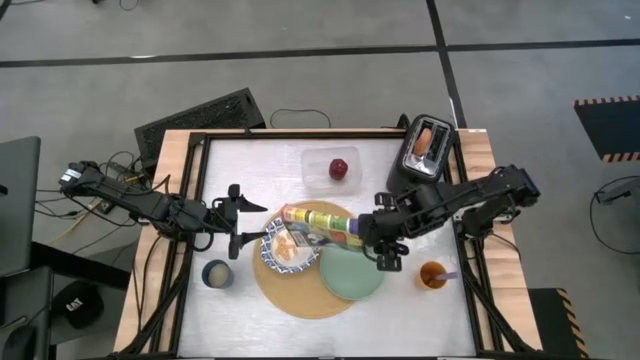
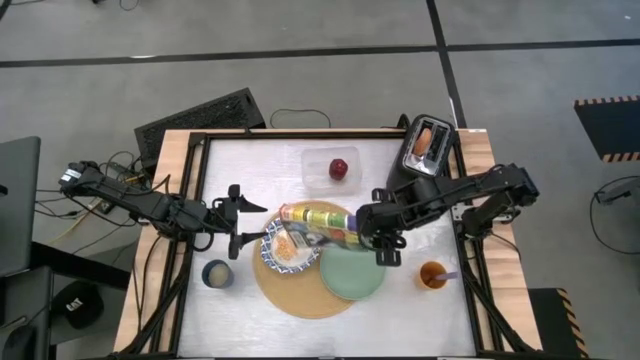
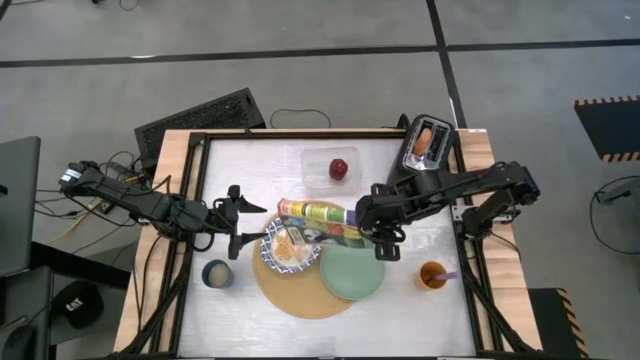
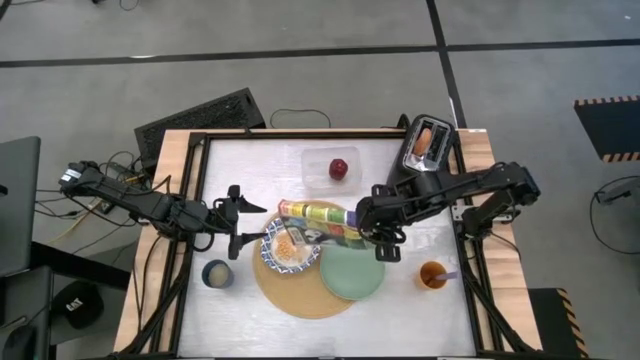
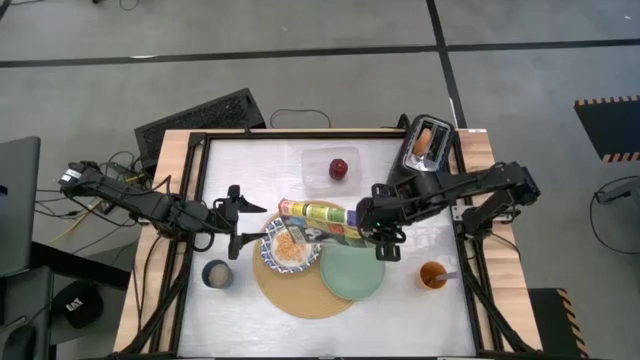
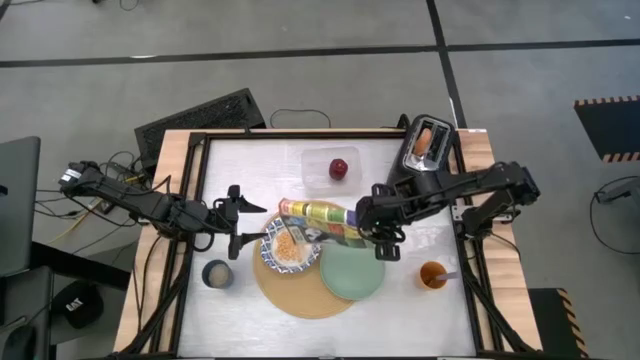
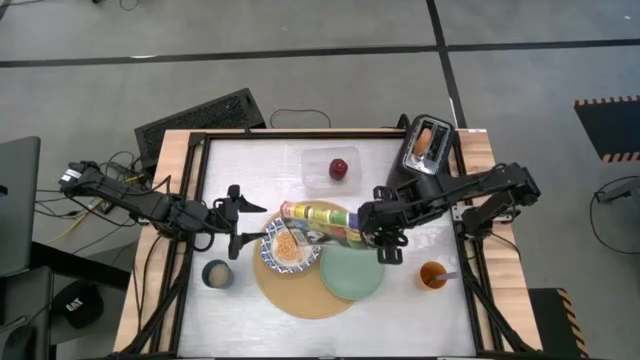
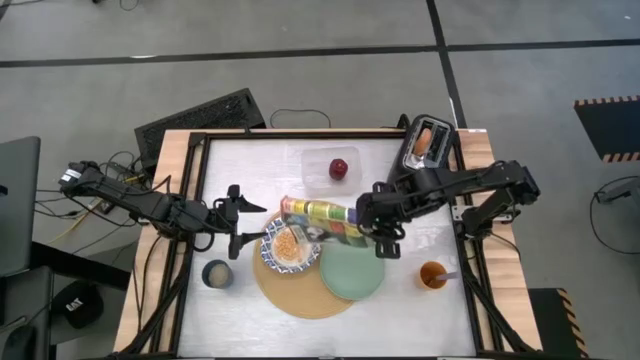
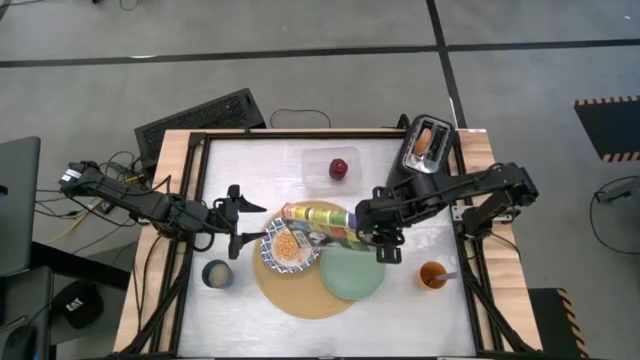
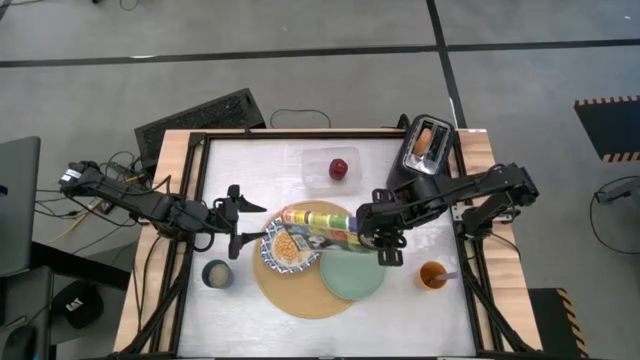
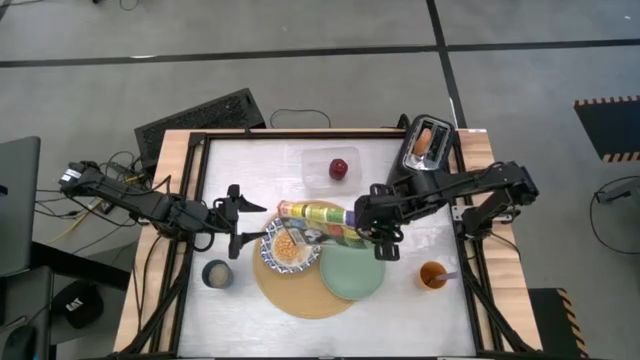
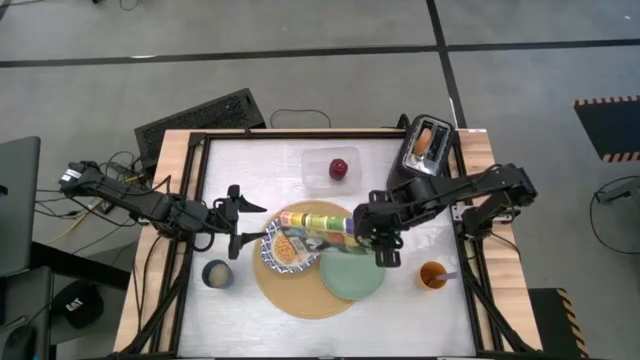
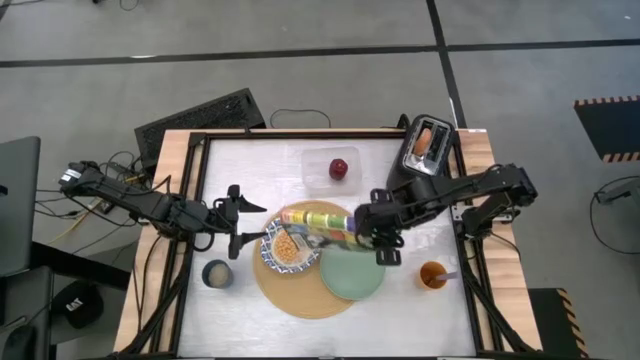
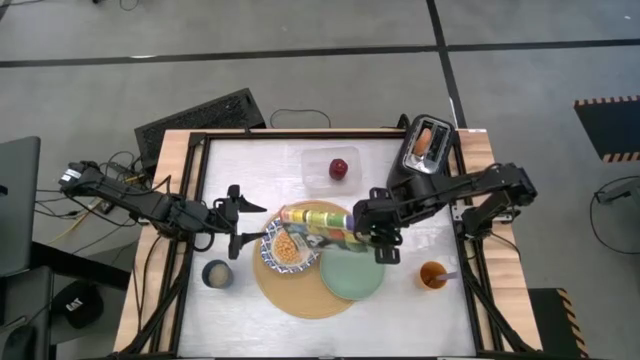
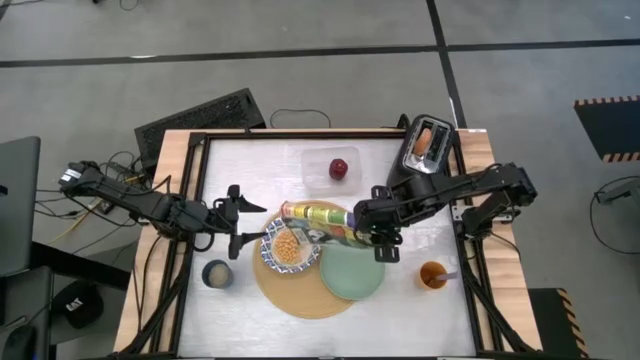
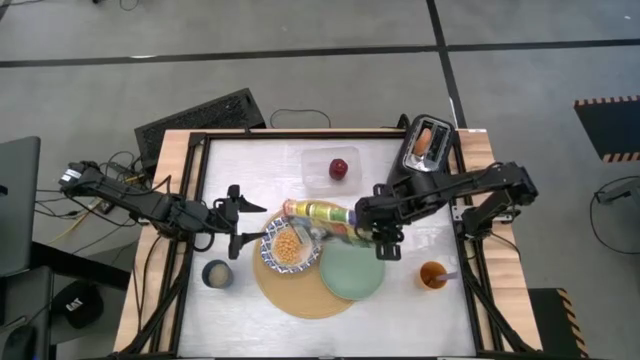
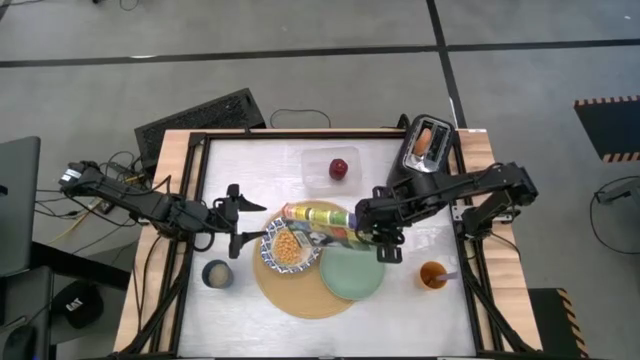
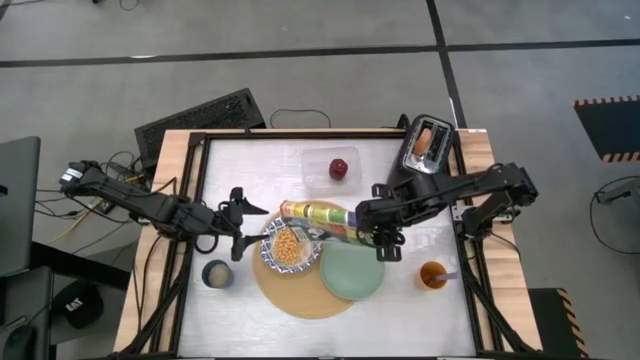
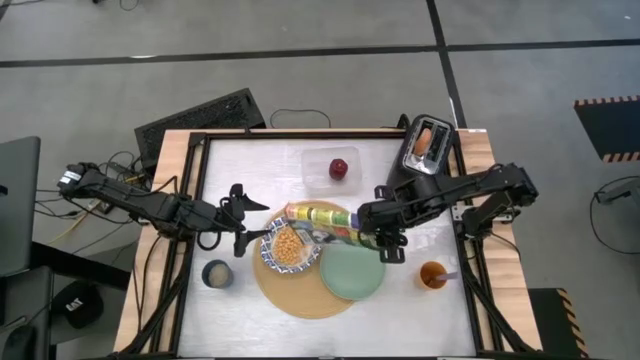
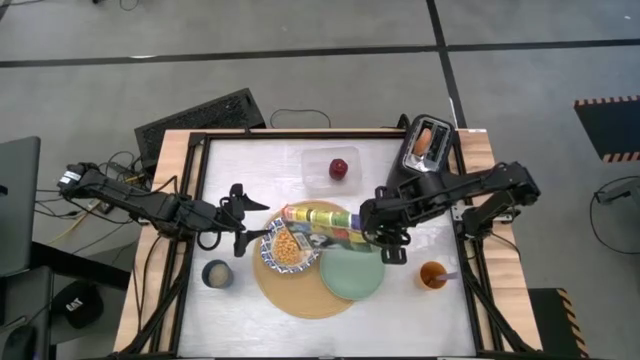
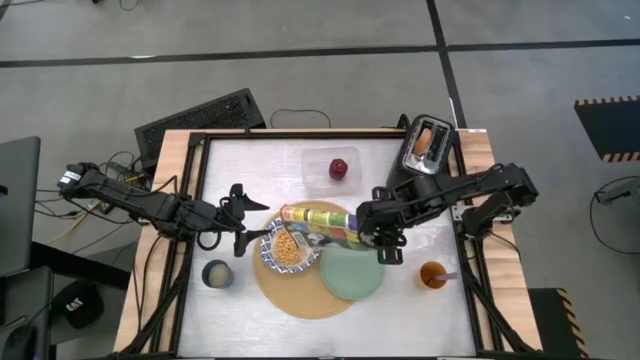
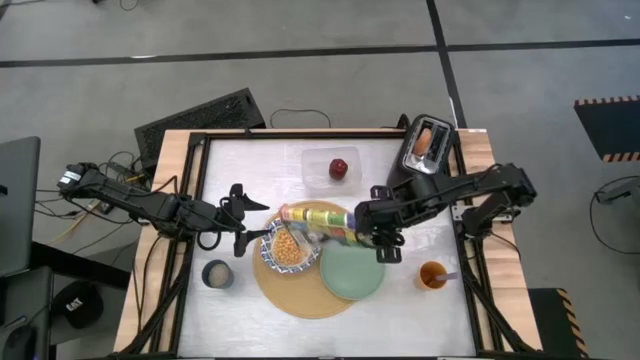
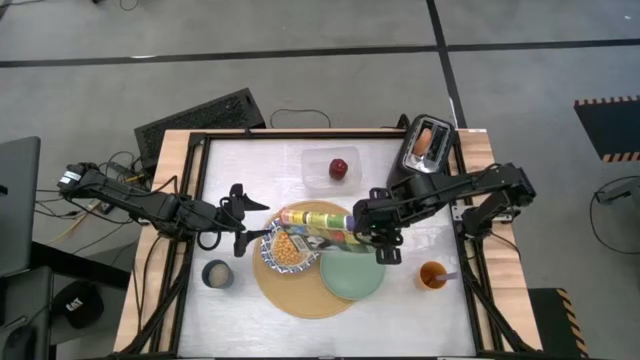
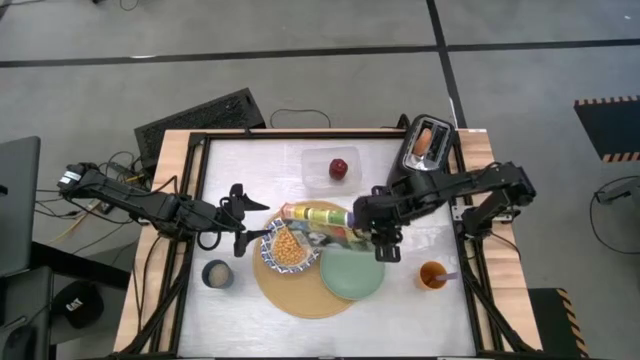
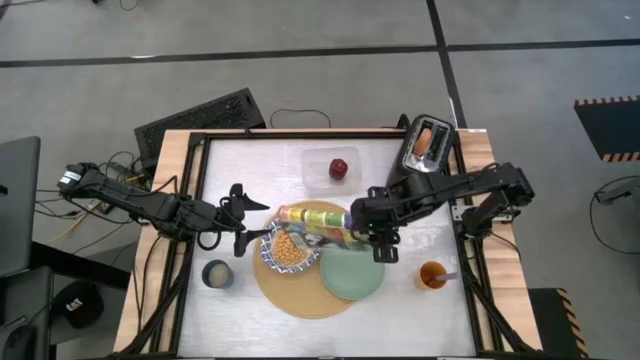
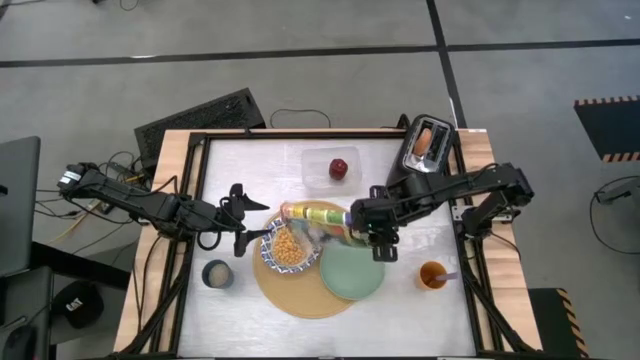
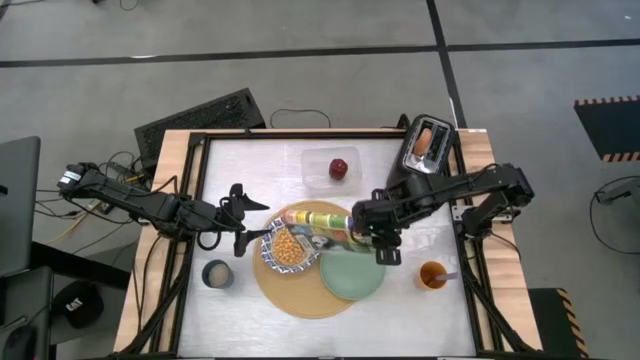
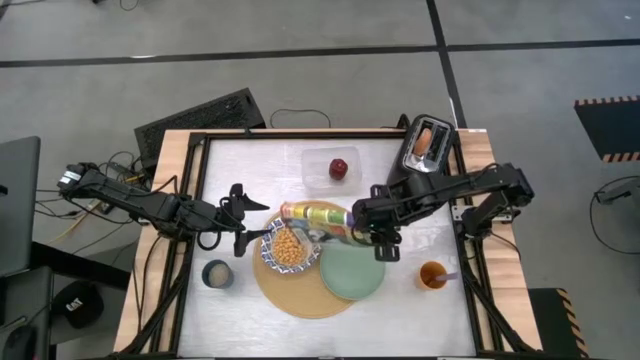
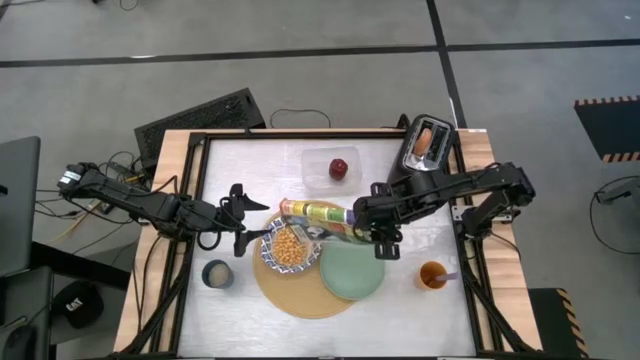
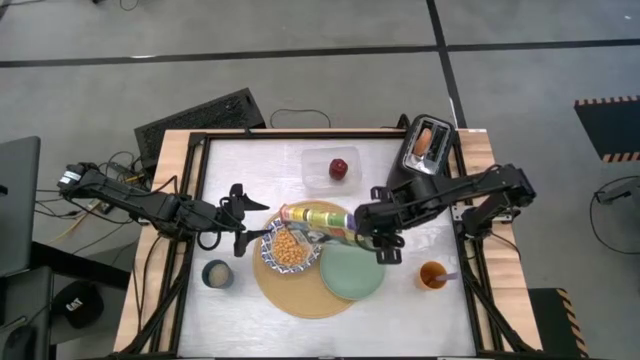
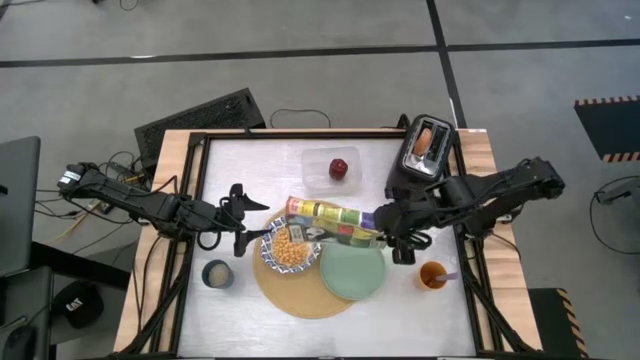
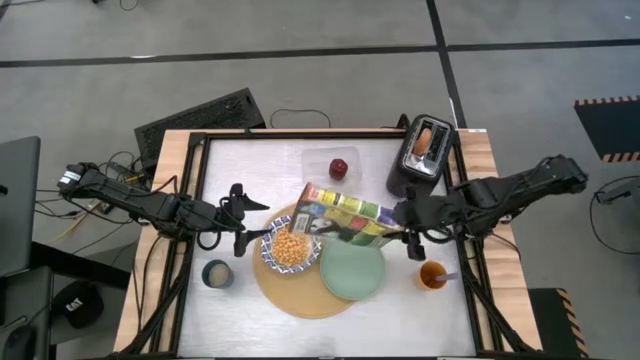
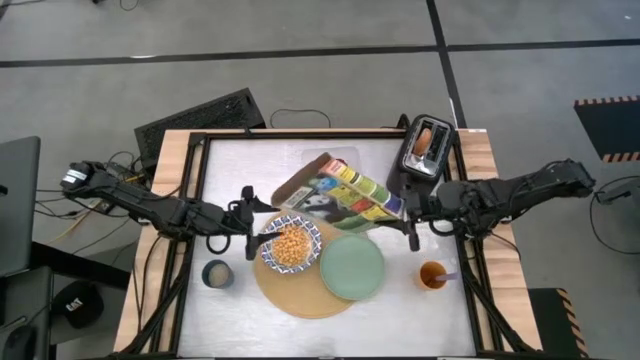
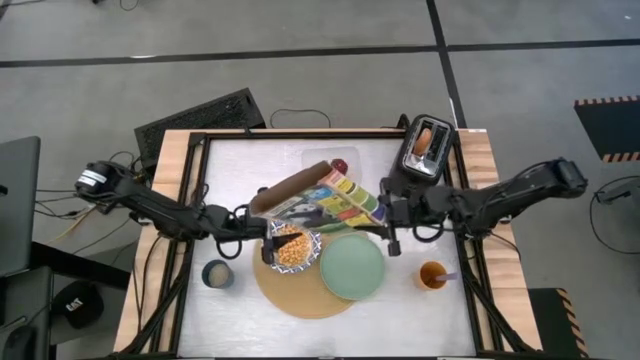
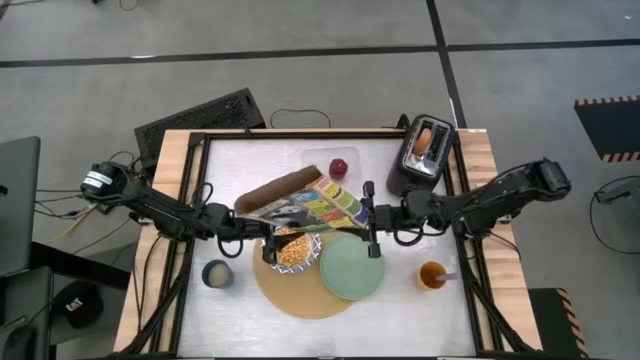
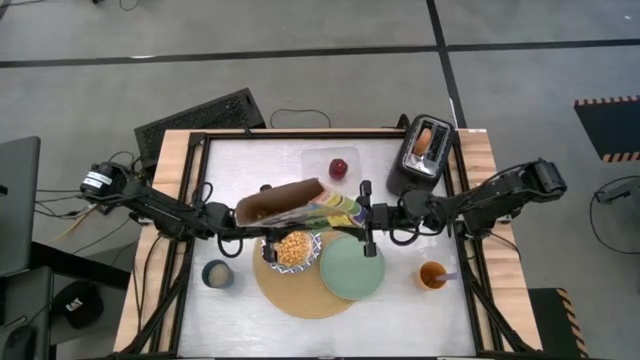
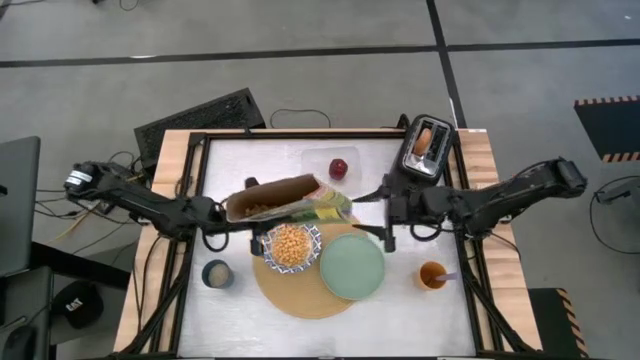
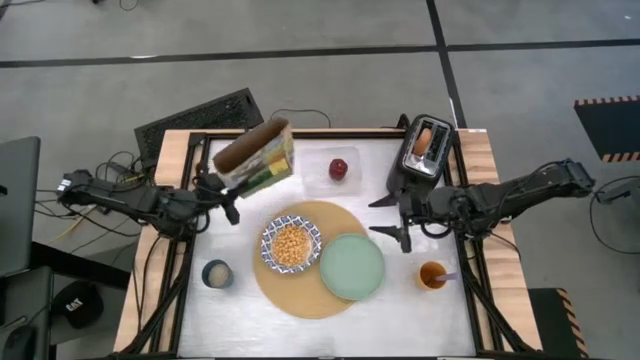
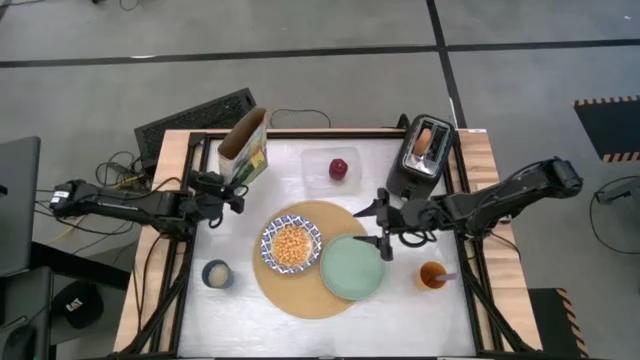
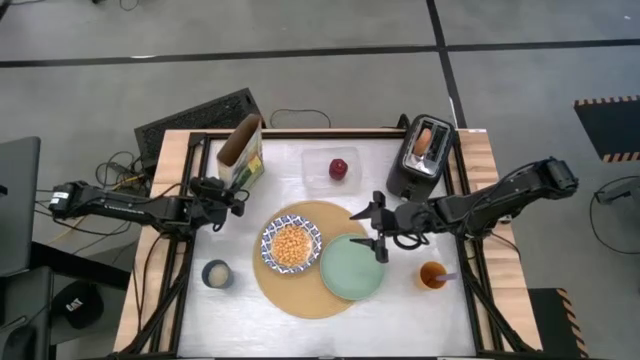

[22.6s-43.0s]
Task: Arrange a breakfast setting
Pour the cereal into the white patterned bowl
